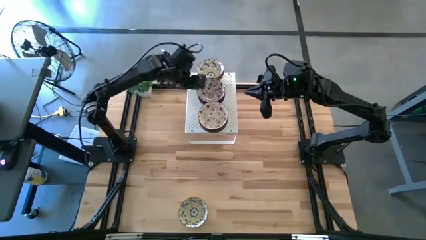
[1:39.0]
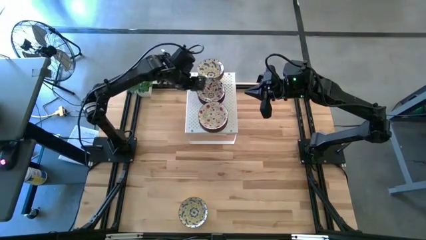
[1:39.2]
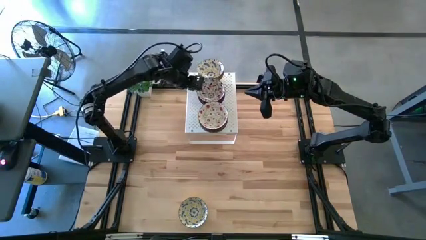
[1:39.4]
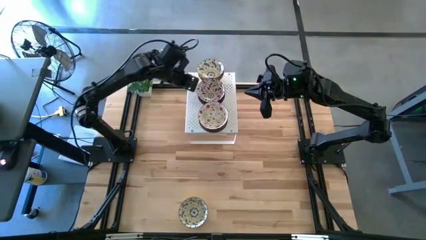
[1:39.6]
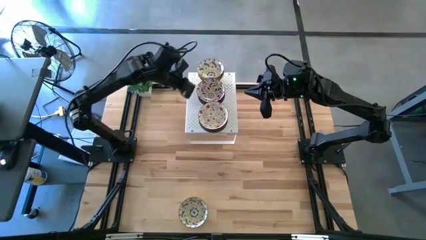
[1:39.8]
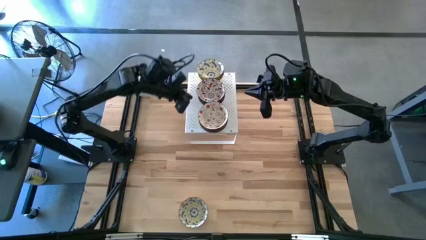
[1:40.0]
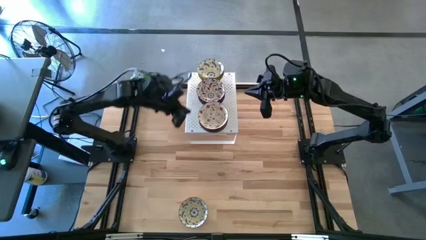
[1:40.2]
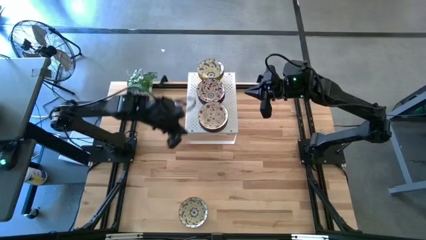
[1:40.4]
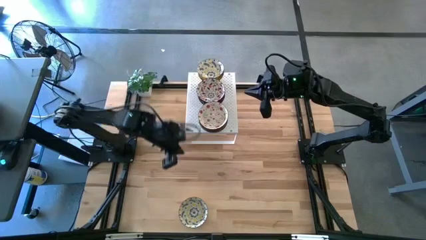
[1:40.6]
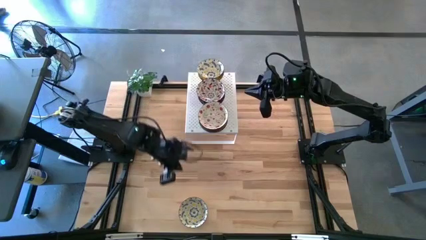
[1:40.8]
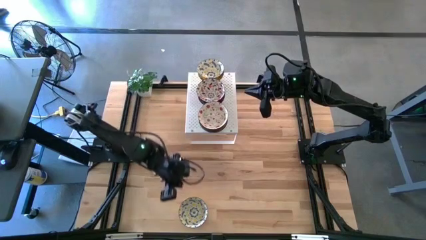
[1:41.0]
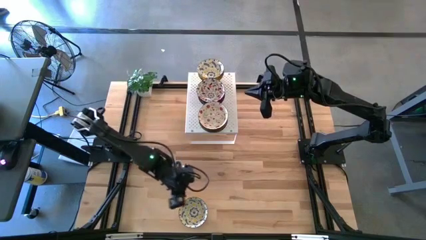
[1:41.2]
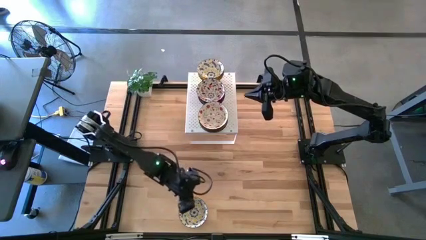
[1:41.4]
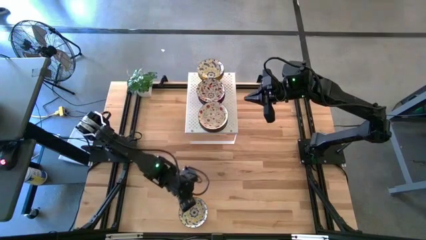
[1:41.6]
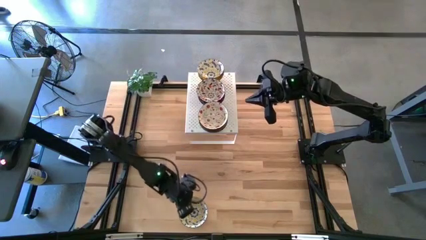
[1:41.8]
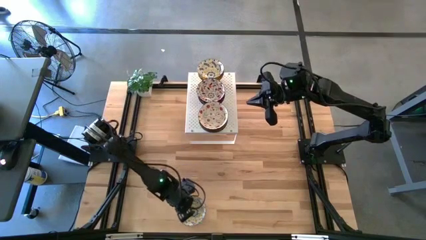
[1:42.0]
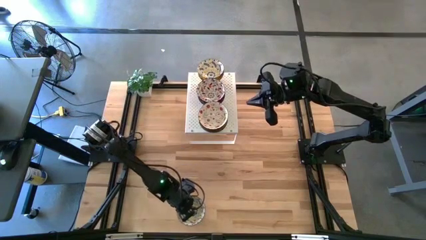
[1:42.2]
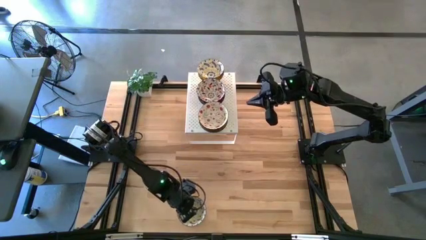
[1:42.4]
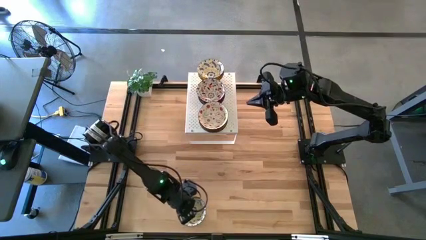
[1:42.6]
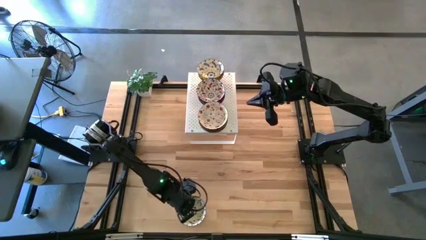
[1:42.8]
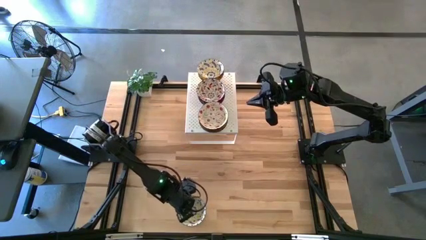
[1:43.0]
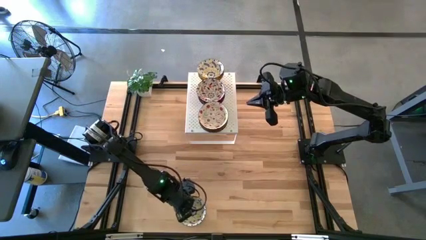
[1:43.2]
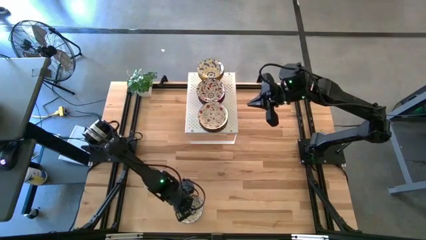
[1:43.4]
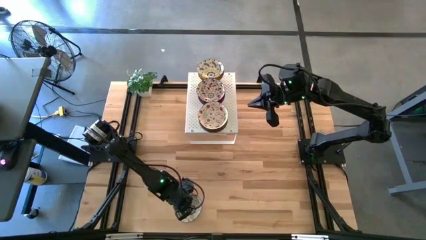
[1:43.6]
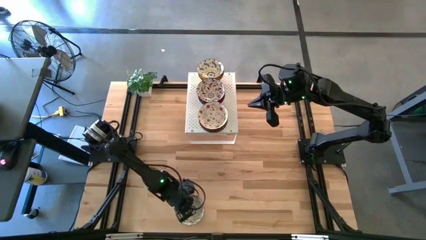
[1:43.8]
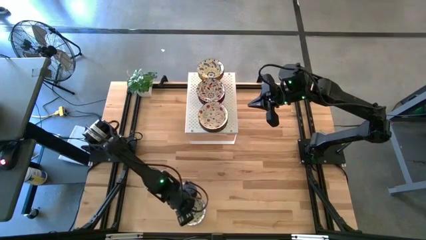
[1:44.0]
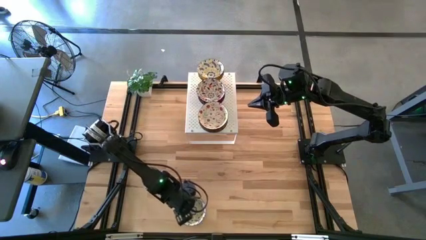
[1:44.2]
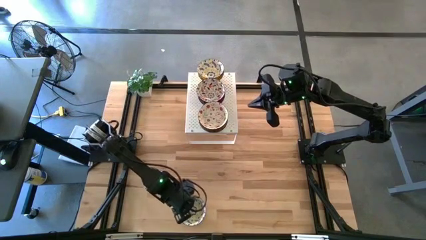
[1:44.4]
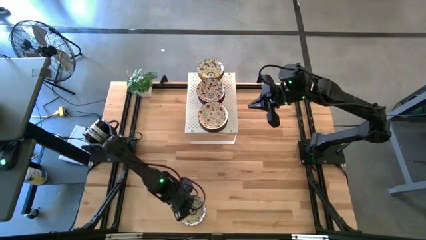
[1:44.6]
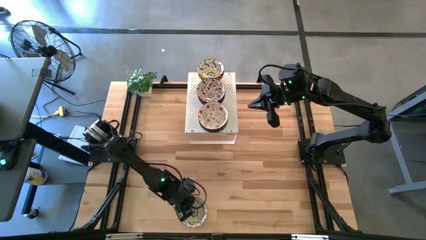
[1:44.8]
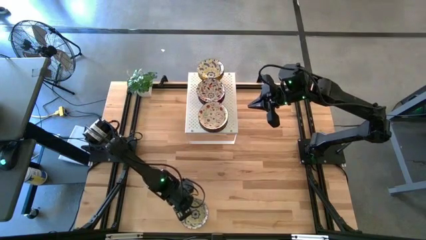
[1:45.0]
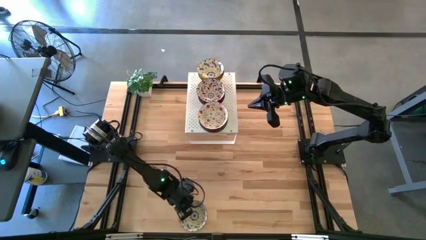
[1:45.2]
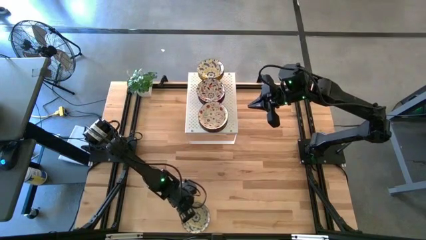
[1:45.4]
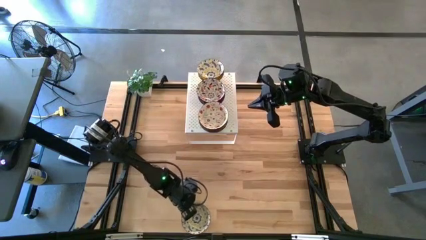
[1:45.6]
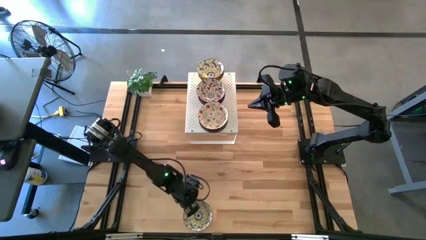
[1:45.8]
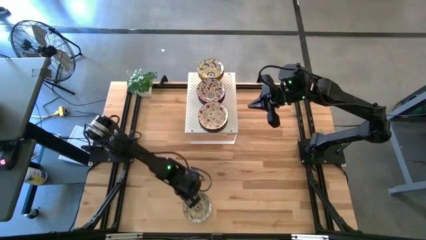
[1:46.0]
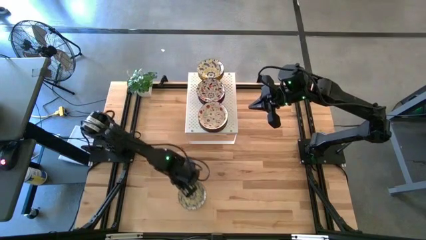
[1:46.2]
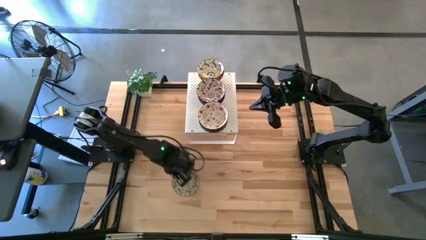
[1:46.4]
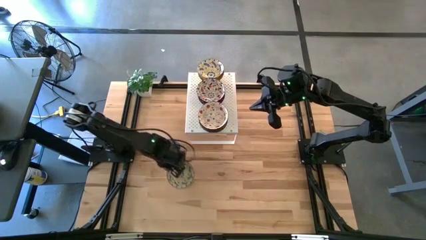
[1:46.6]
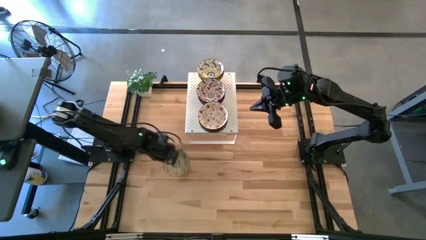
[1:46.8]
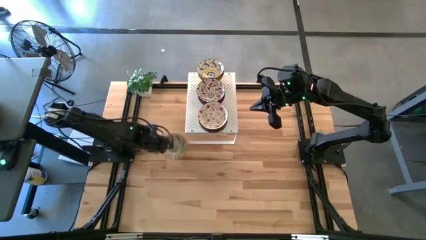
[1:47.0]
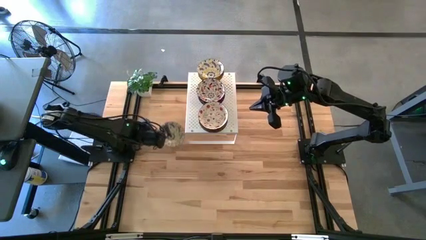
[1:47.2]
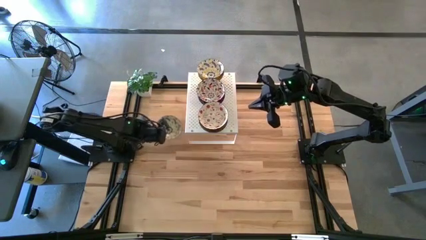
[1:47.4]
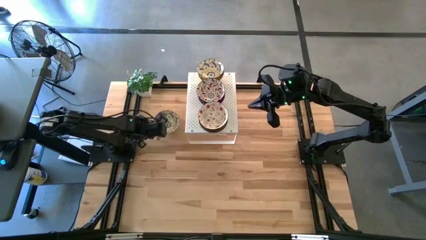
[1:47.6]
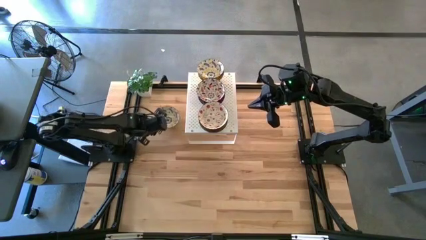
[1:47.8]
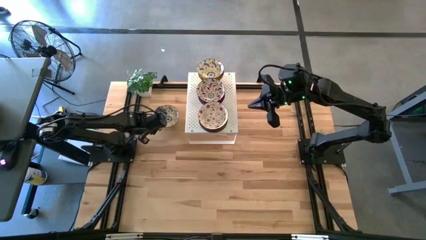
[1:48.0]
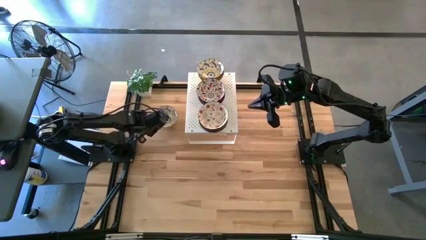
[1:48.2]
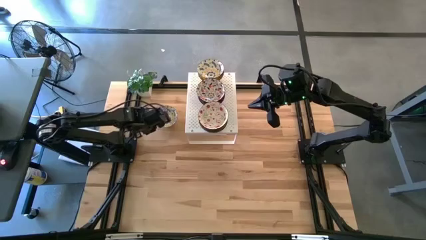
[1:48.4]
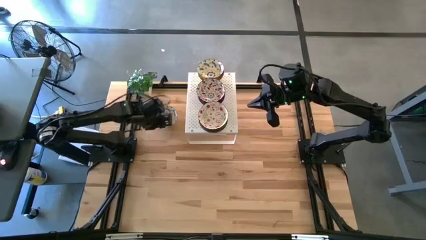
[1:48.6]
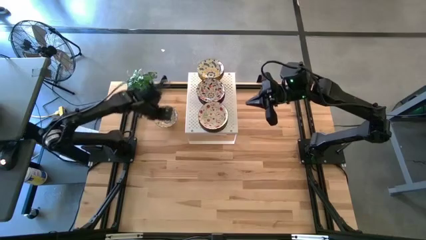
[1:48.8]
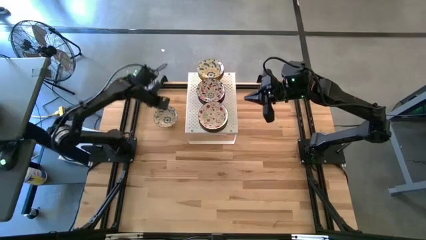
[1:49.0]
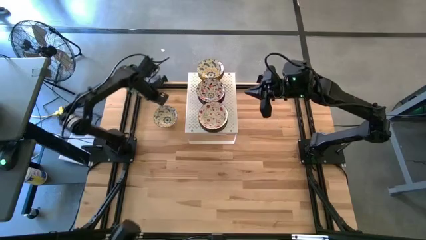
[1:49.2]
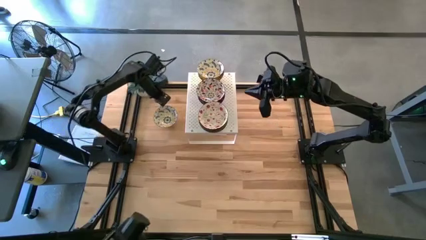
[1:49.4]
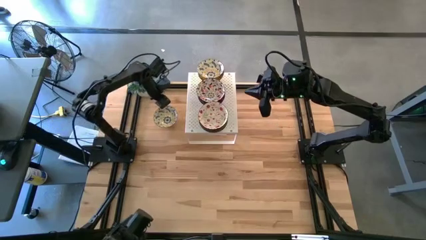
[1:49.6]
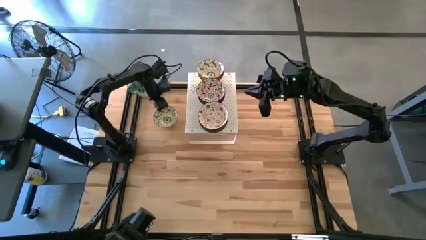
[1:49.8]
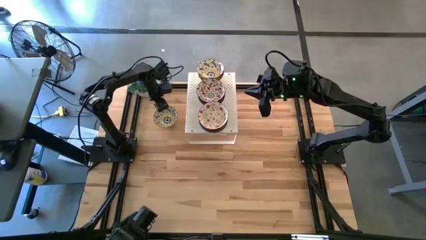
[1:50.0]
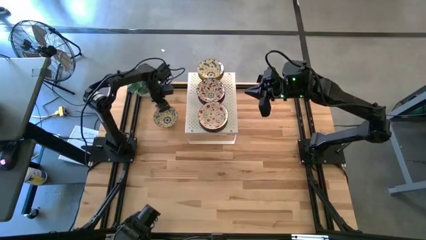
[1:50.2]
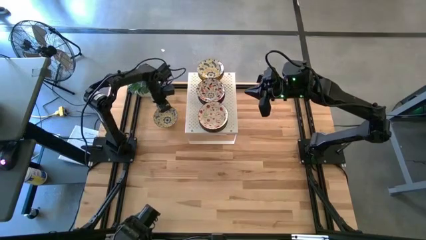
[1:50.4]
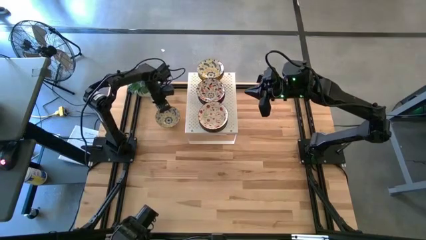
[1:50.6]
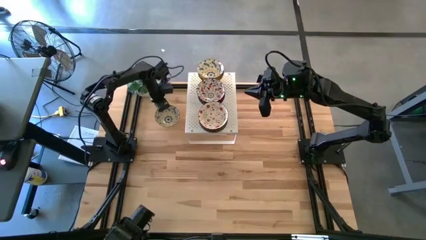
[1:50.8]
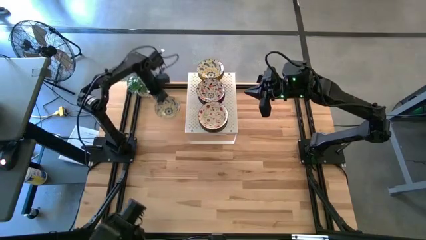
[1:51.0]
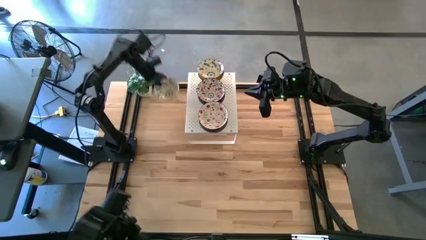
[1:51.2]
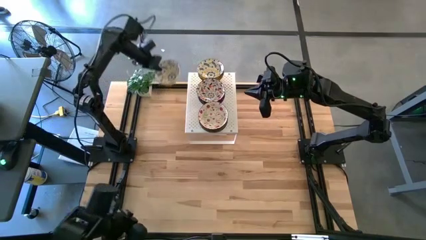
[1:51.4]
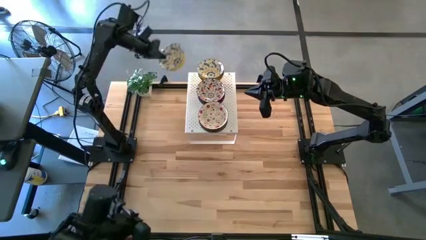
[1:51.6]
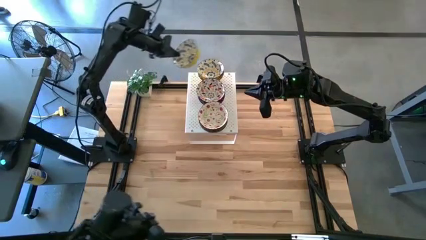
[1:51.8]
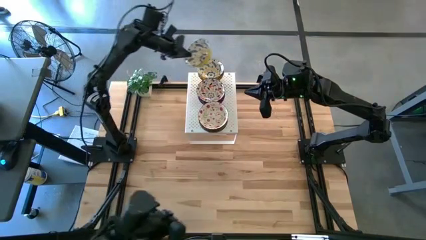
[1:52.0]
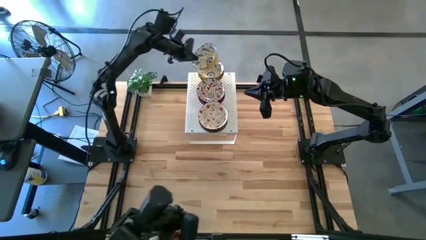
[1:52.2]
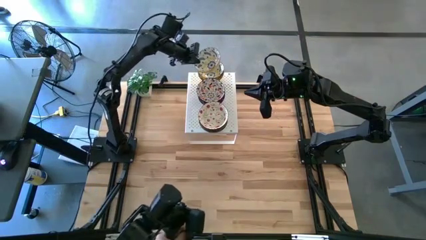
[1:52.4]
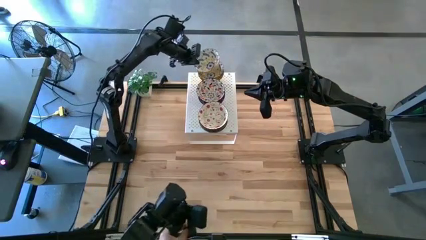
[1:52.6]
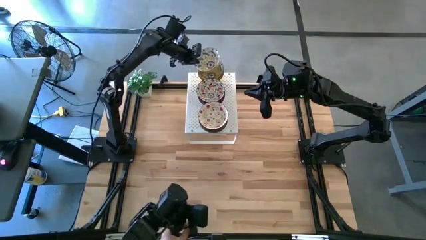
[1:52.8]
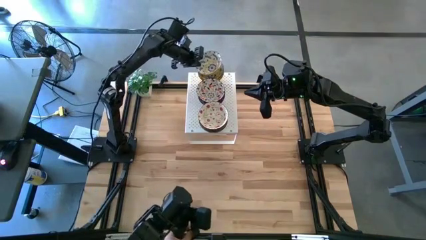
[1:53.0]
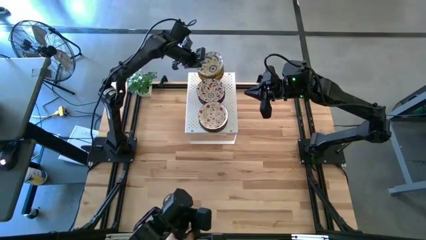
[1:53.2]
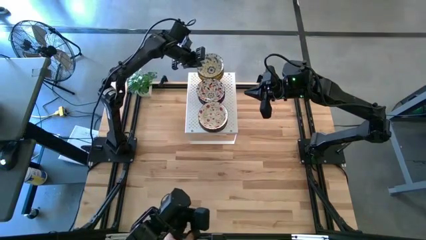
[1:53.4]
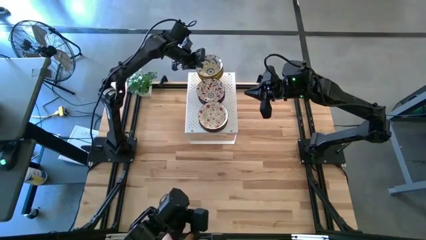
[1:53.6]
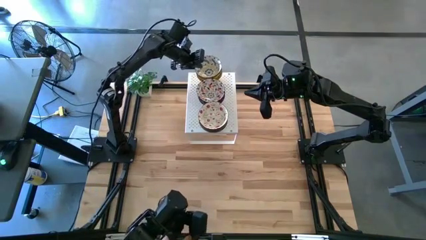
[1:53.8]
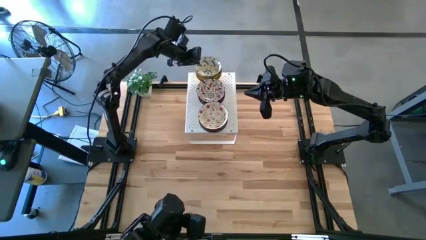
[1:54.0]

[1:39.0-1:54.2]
Task: Pick & Place Mini bowls
Stack the yellow patterned bowl on top of the yellow patterned bowl on the shelf
